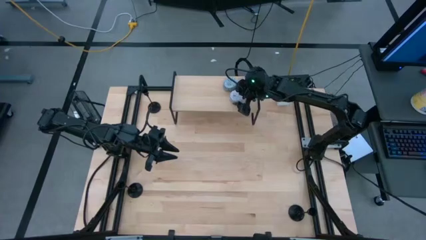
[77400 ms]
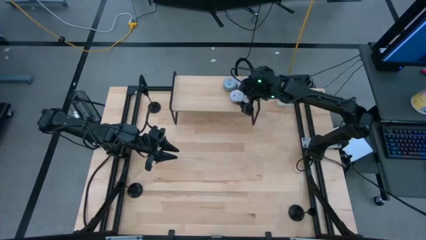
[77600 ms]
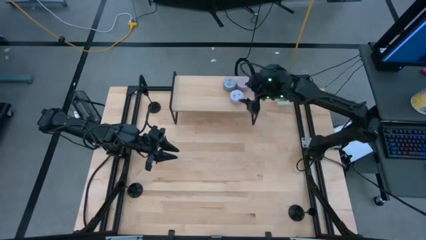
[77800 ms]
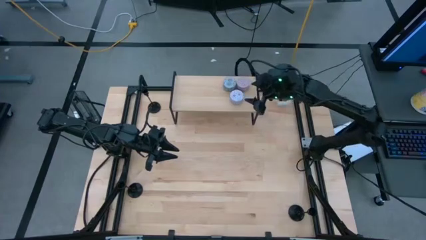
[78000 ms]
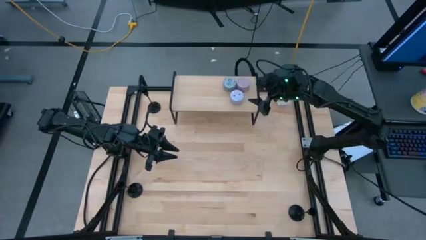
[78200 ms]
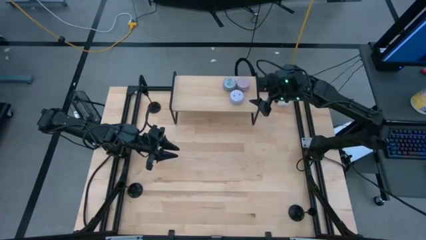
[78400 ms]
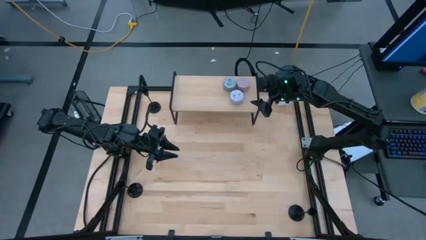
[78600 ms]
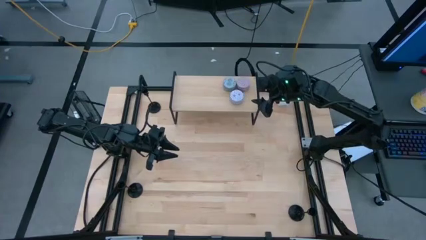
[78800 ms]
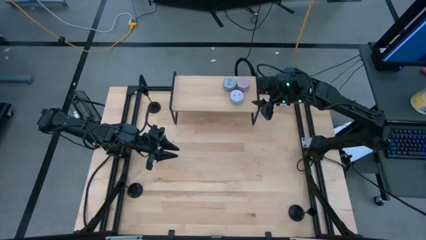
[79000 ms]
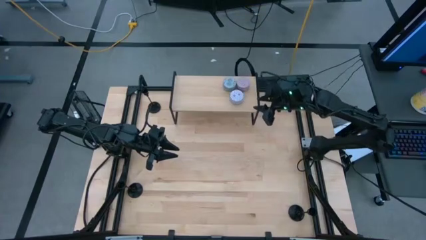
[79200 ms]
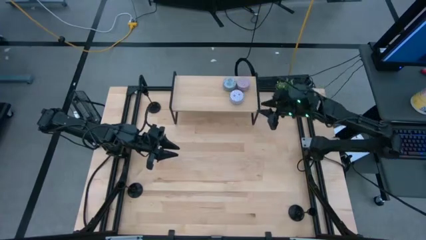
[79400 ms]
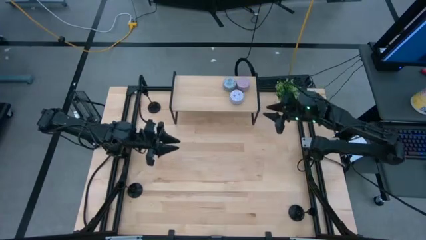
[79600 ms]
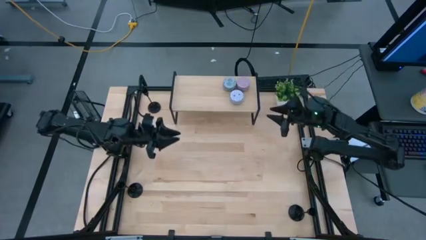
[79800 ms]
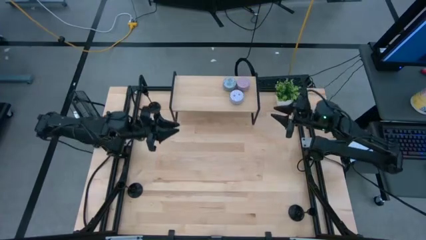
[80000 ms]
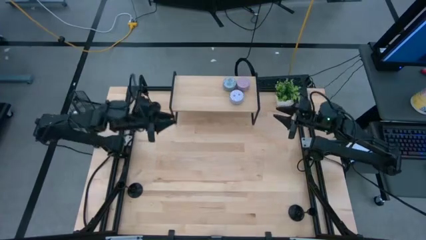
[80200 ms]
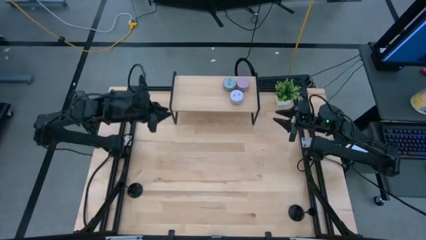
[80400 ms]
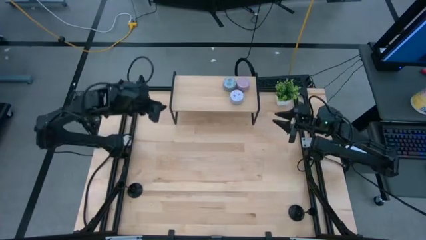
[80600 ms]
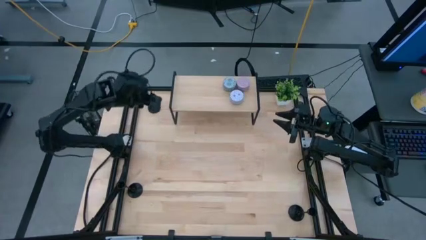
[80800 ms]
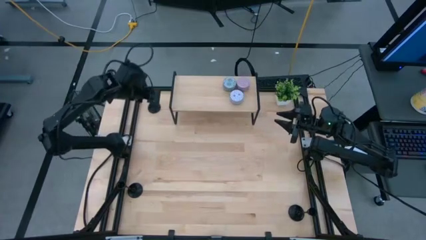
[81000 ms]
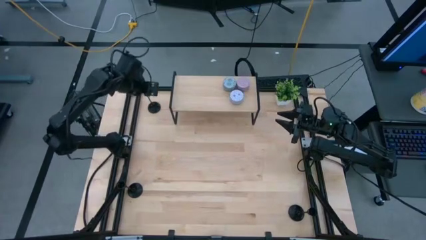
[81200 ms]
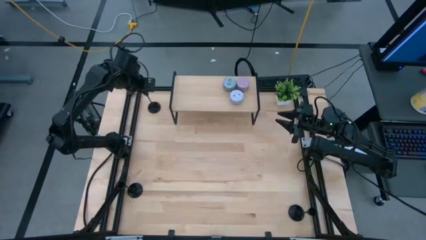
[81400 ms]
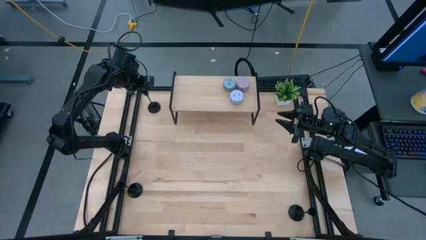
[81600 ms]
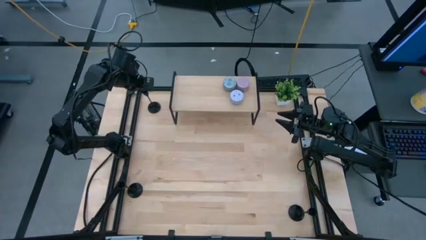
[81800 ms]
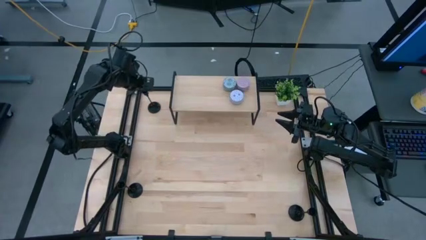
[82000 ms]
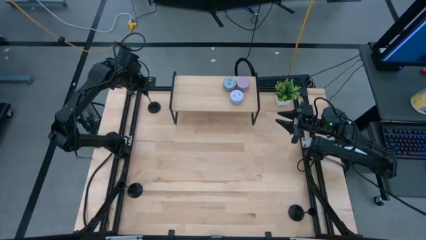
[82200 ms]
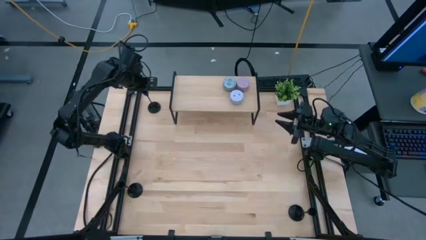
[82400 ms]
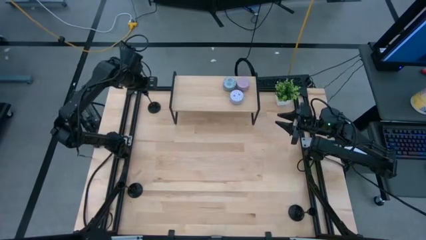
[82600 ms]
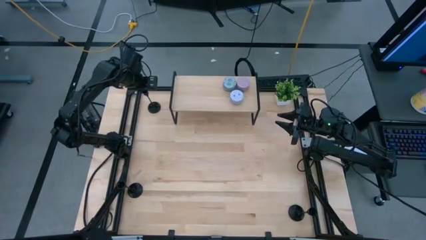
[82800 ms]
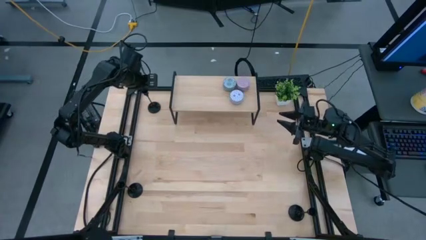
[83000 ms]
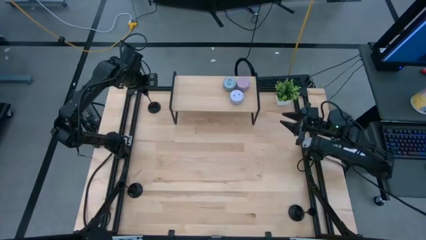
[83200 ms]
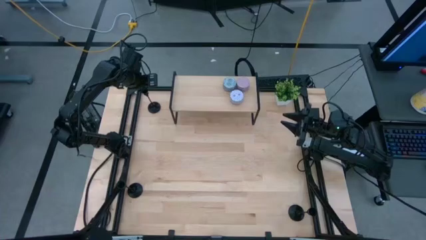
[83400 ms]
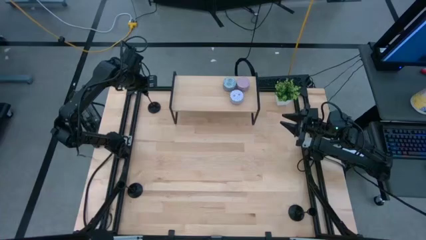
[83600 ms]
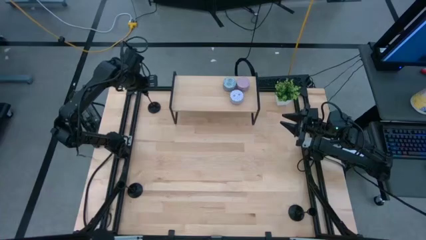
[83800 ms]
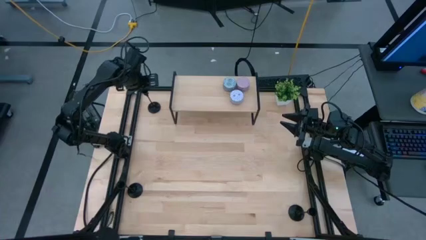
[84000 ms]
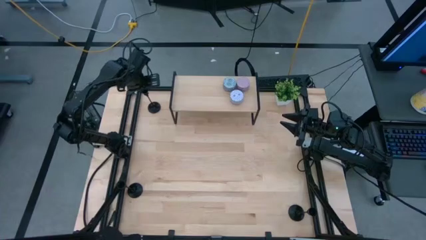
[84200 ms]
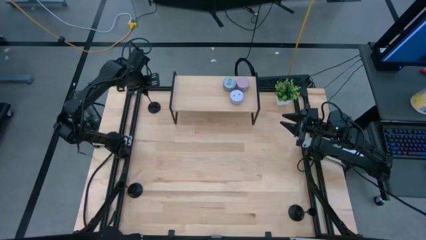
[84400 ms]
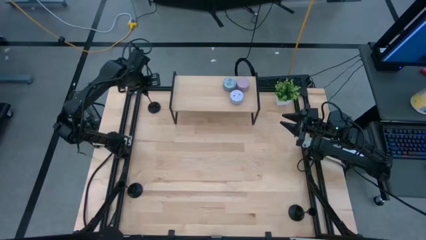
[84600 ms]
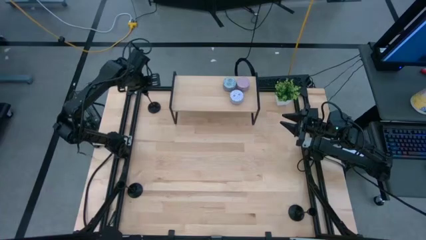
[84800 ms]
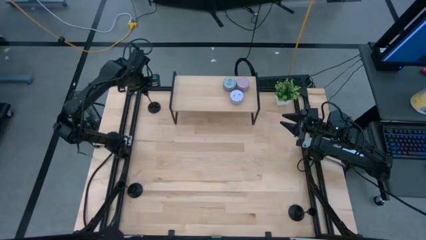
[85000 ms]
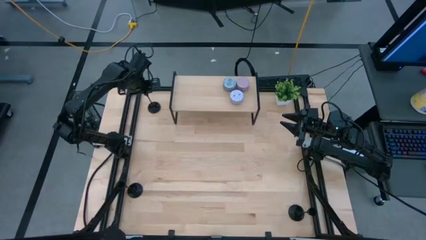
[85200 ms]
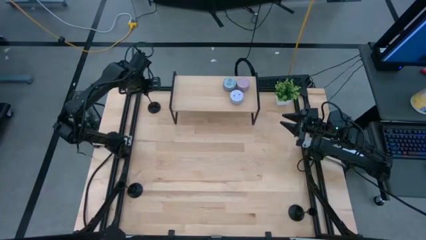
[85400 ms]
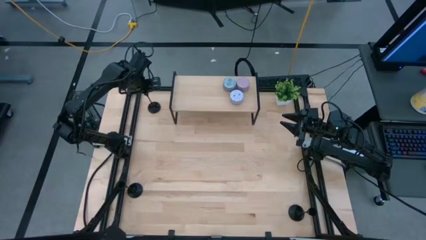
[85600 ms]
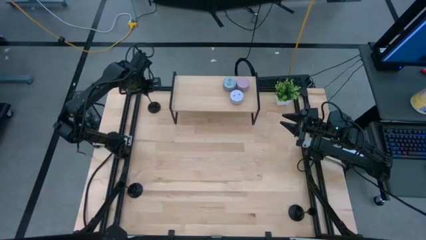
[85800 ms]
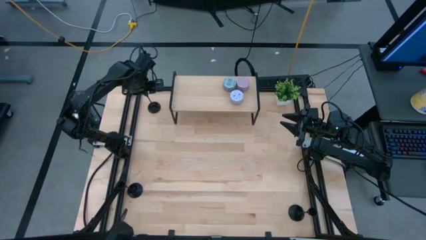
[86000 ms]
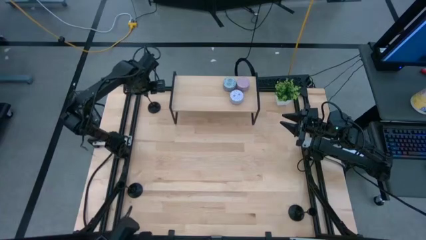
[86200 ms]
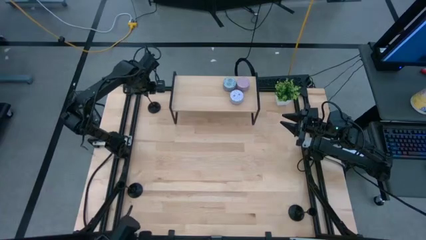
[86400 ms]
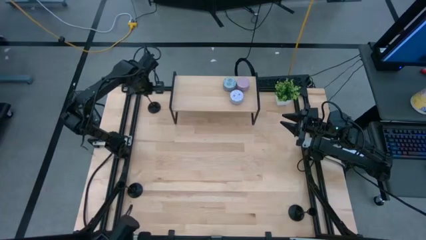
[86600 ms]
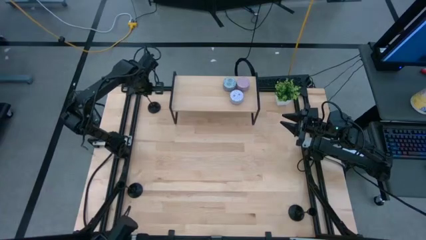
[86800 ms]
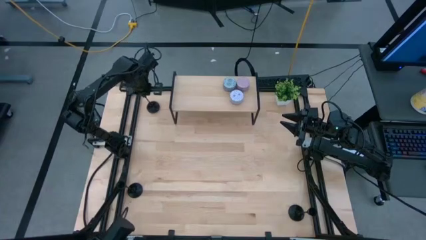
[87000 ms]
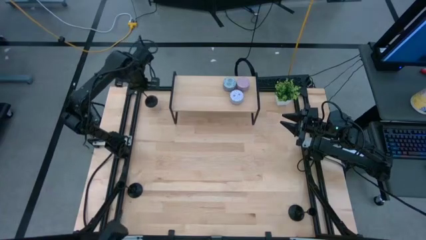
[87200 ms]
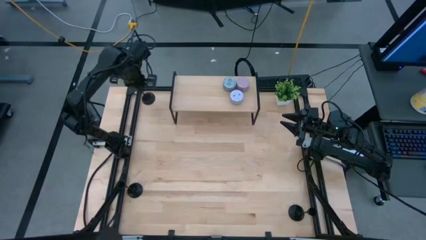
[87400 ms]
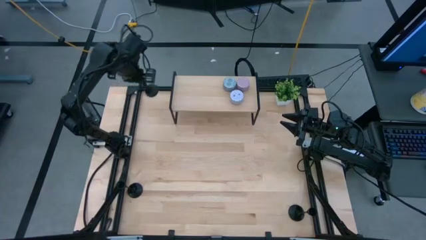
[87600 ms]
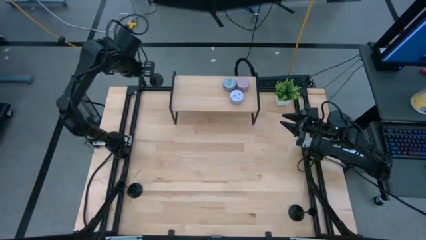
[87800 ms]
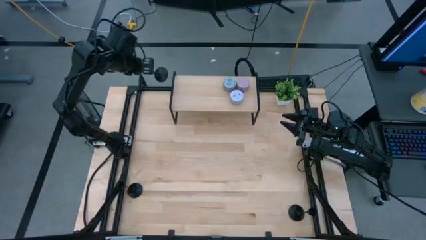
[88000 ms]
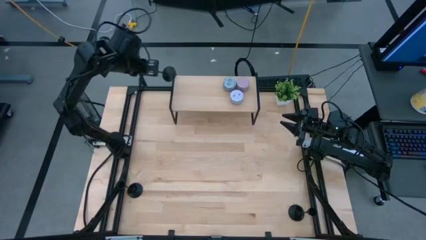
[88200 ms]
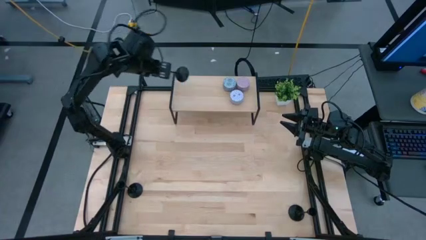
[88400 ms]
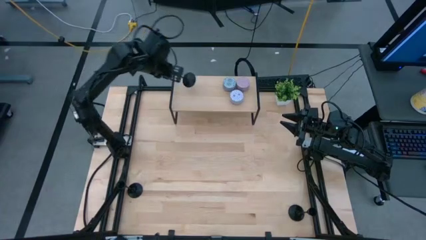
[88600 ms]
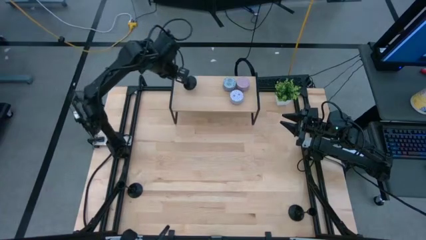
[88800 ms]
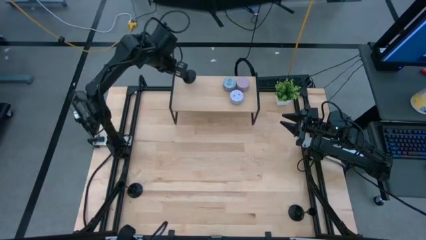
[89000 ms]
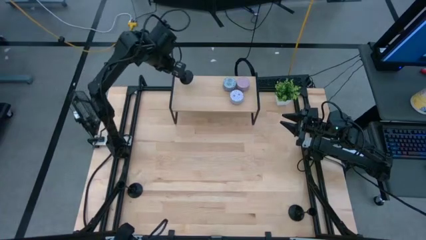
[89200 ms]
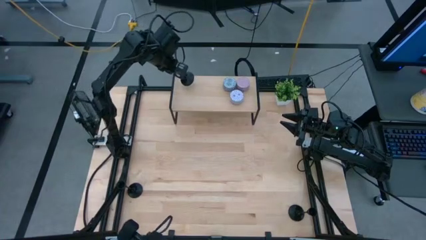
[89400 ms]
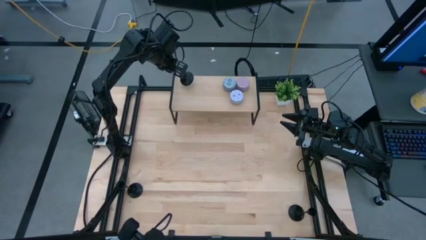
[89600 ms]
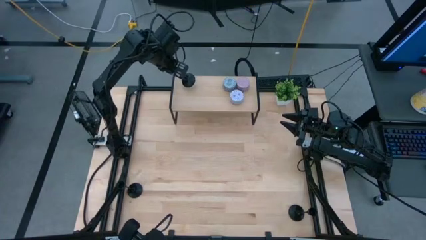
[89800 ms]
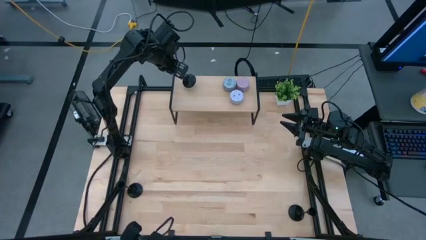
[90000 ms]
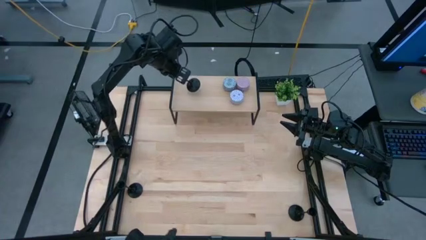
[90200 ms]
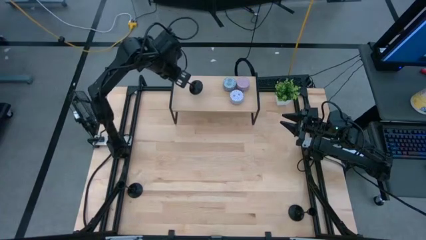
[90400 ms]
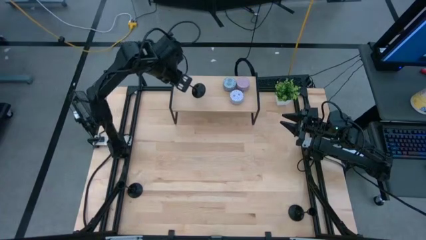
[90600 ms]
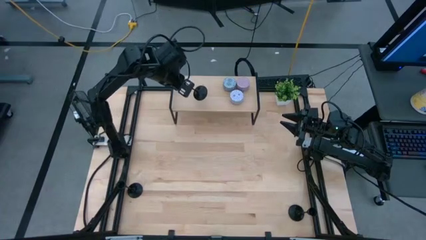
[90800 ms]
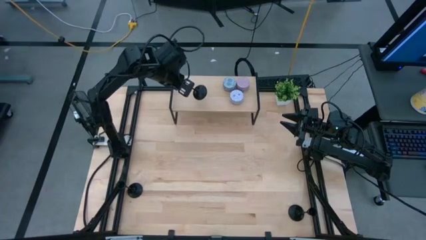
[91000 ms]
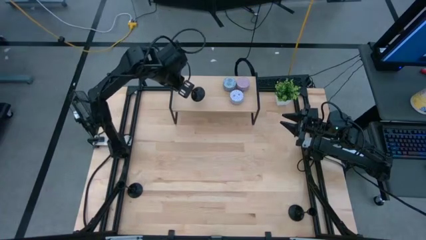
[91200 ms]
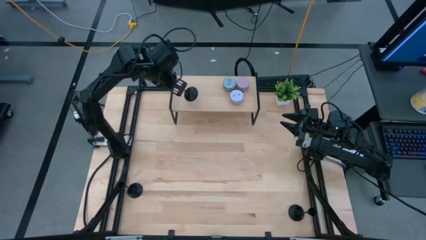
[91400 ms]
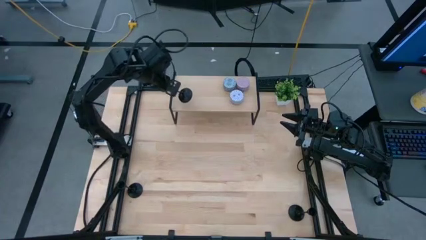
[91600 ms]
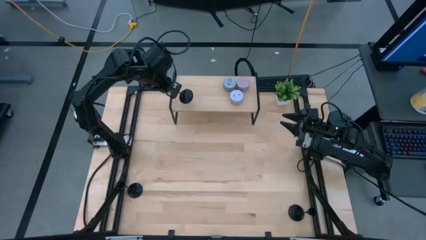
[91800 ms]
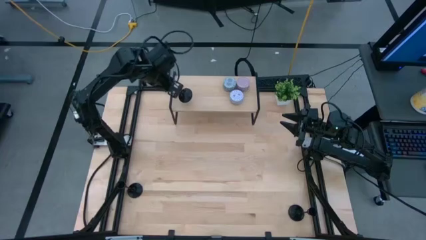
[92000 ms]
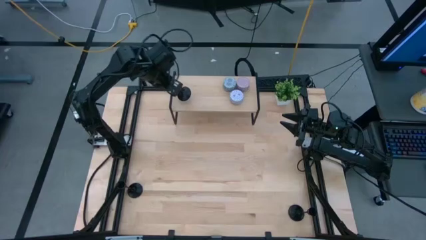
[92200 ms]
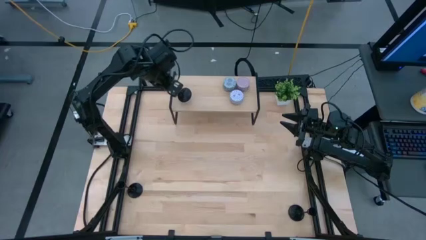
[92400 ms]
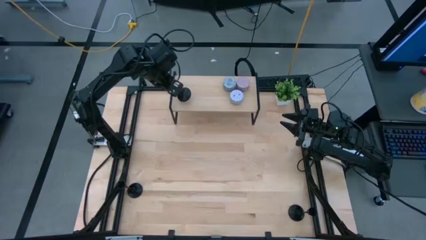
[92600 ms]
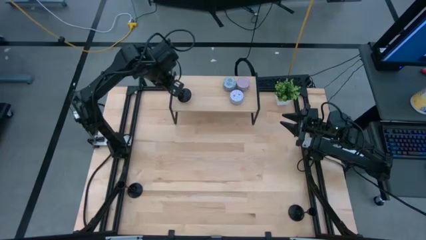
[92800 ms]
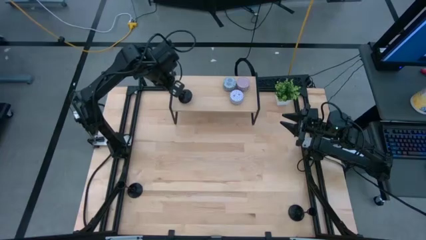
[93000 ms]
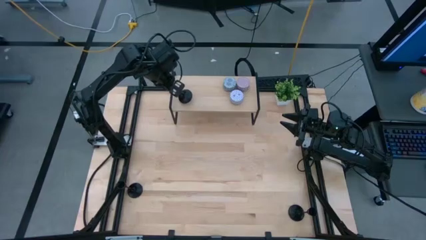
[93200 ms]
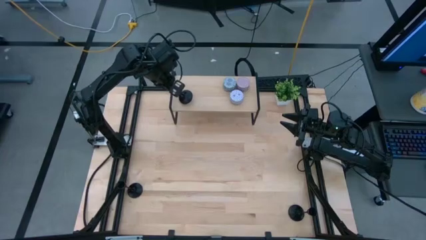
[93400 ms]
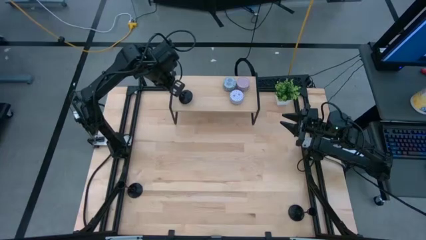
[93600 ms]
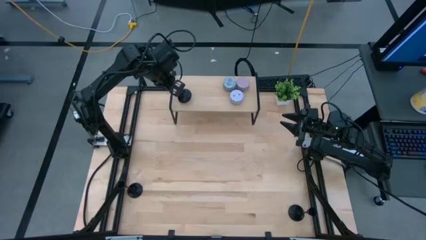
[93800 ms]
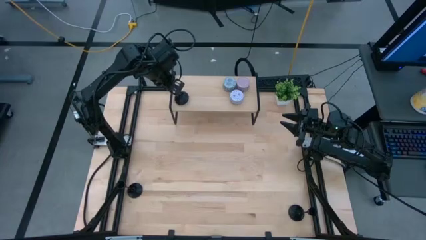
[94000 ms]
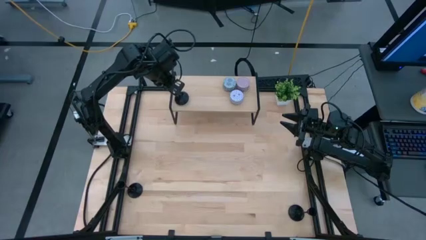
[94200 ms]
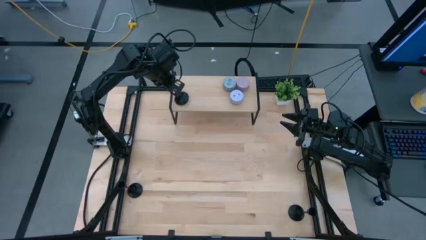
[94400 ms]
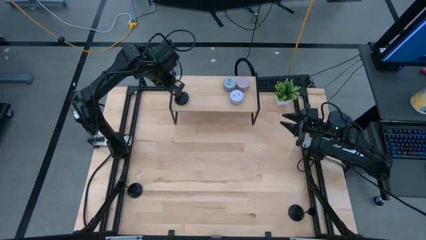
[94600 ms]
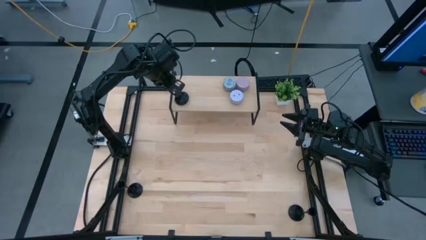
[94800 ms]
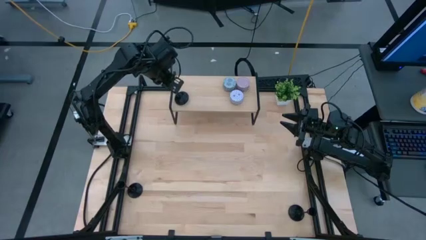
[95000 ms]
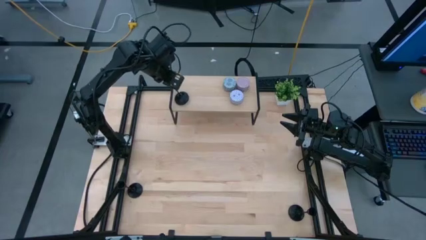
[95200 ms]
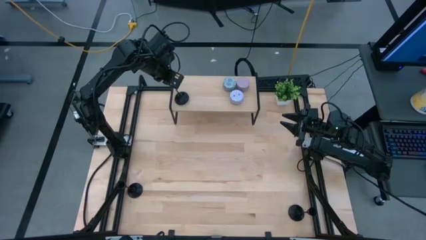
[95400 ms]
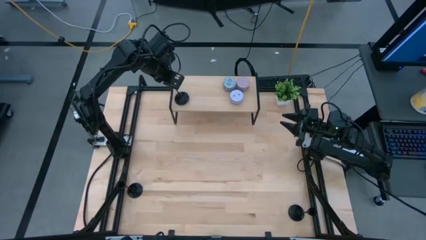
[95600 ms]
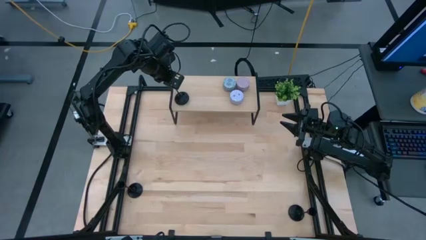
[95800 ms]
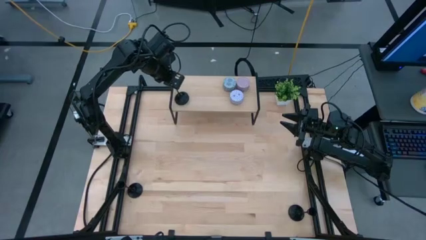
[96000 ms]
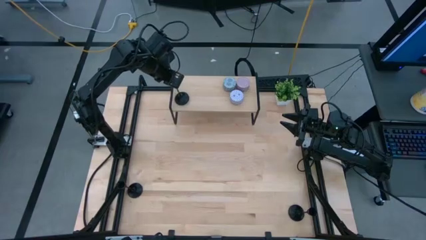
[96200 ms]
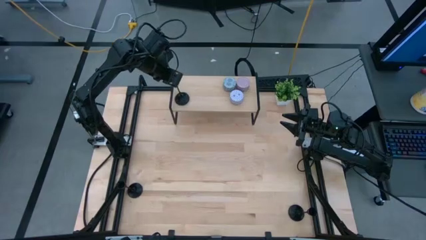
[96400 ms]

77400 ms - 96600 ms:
Task: Pick & Place candle stick holders
Put the top black candle holder on the shelf
